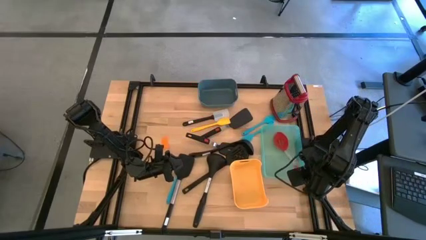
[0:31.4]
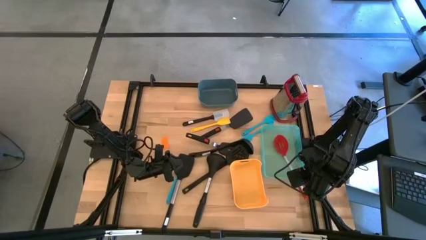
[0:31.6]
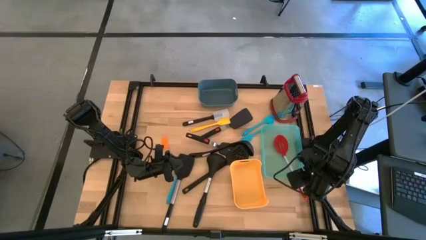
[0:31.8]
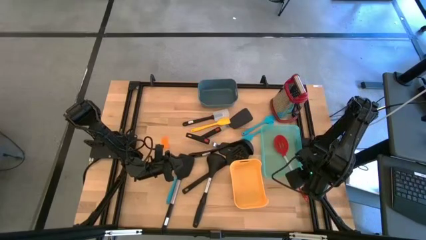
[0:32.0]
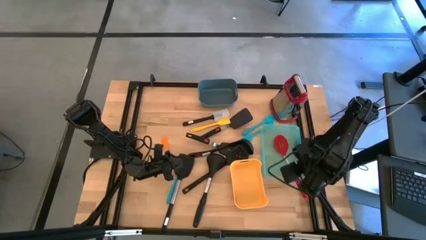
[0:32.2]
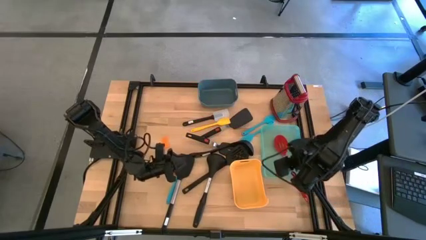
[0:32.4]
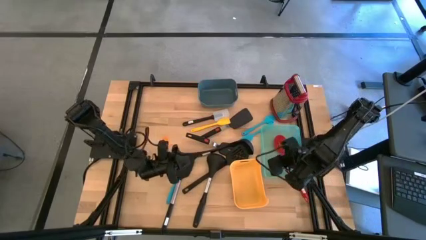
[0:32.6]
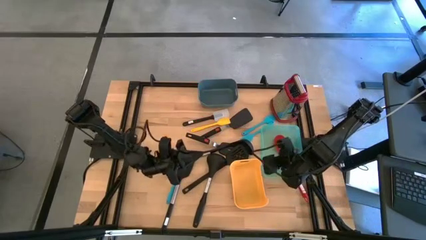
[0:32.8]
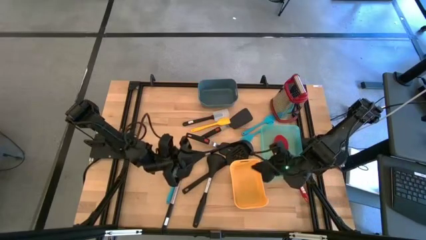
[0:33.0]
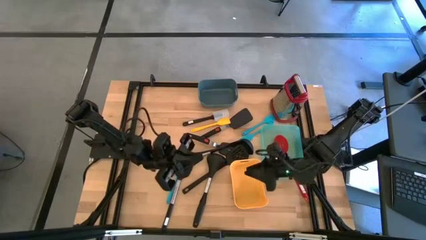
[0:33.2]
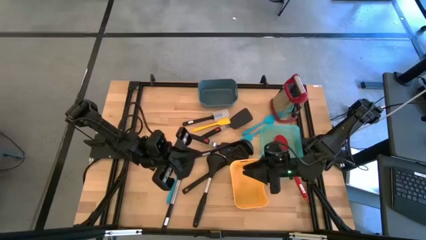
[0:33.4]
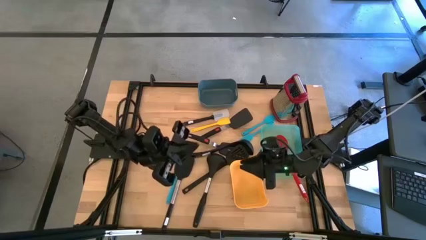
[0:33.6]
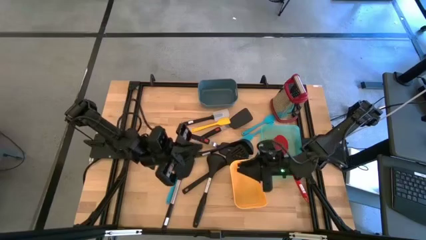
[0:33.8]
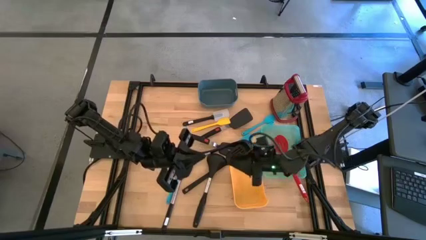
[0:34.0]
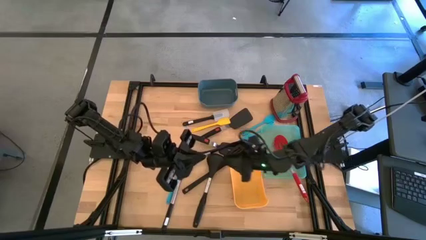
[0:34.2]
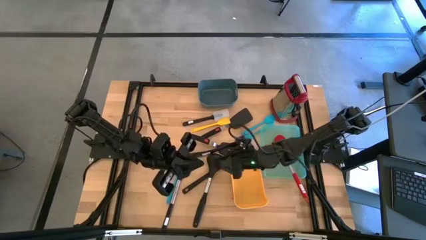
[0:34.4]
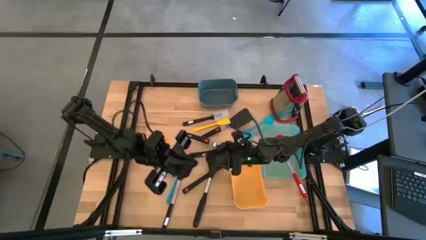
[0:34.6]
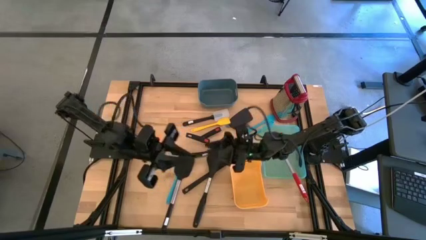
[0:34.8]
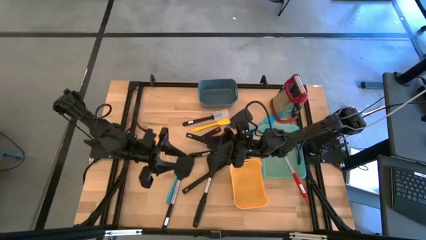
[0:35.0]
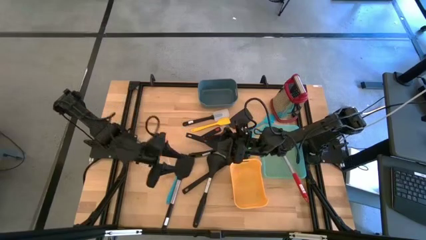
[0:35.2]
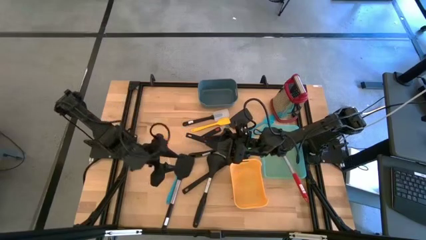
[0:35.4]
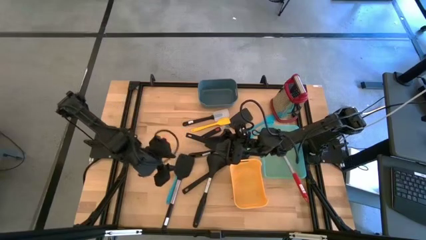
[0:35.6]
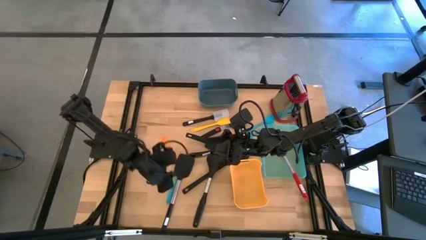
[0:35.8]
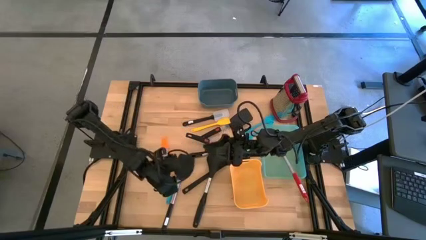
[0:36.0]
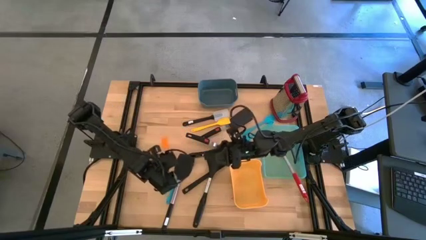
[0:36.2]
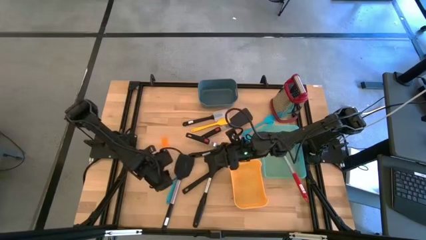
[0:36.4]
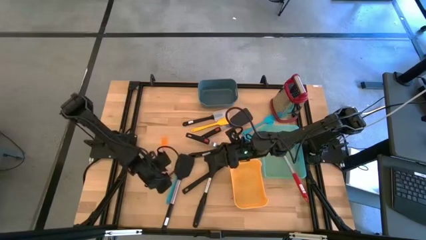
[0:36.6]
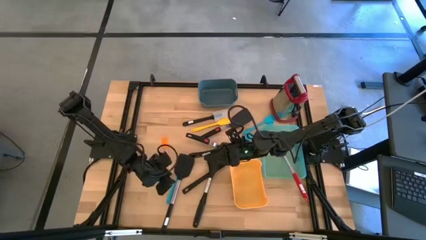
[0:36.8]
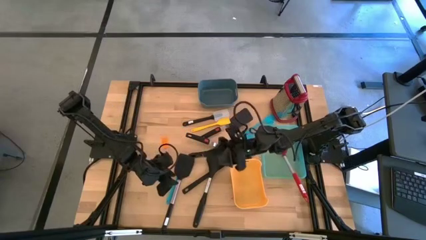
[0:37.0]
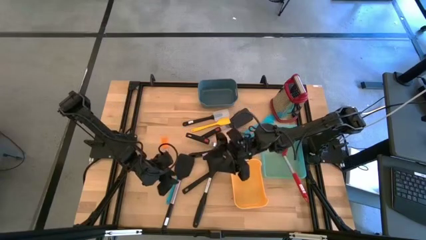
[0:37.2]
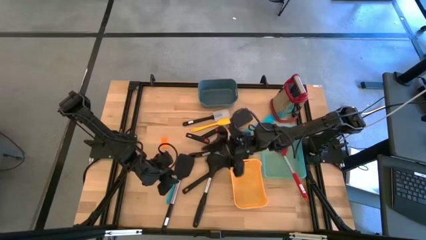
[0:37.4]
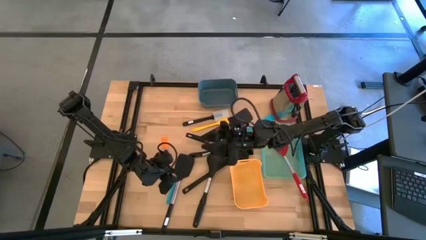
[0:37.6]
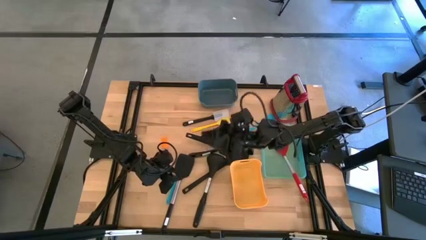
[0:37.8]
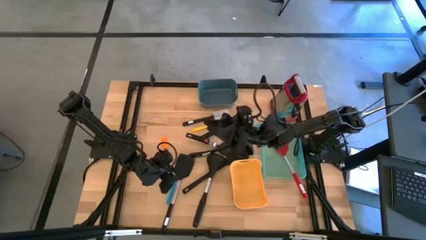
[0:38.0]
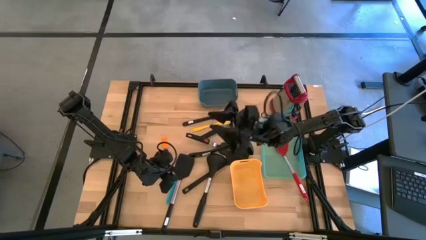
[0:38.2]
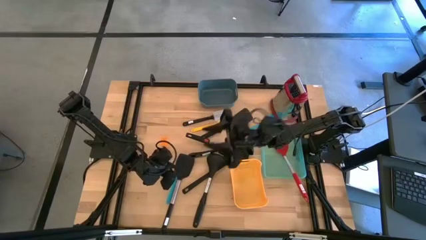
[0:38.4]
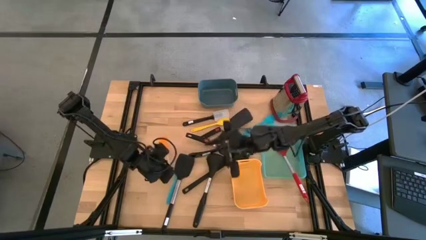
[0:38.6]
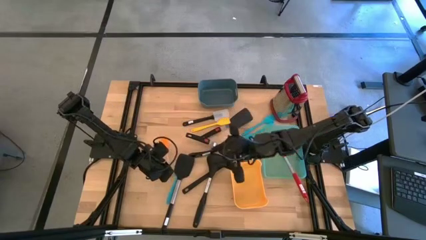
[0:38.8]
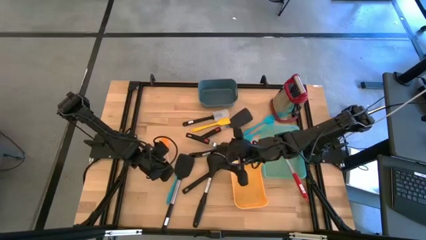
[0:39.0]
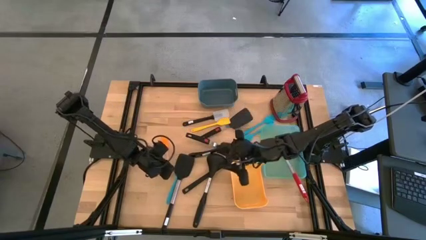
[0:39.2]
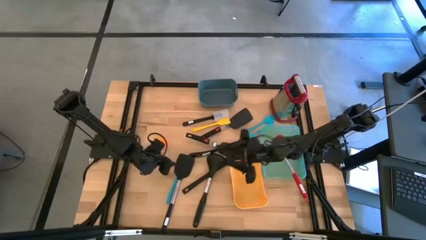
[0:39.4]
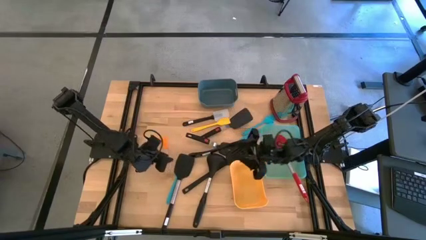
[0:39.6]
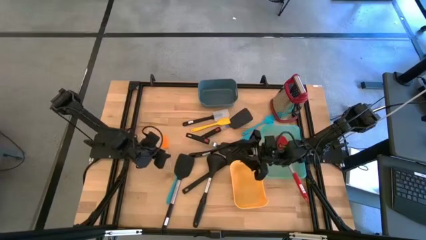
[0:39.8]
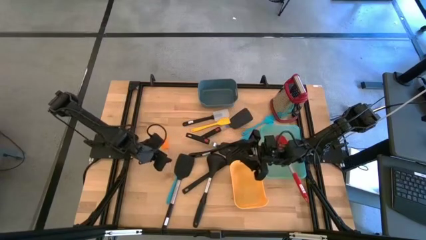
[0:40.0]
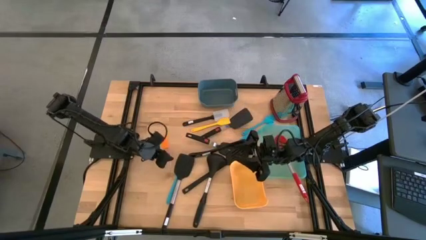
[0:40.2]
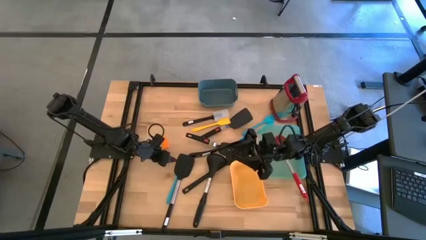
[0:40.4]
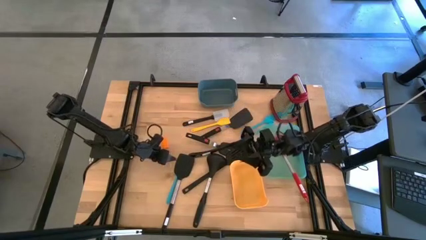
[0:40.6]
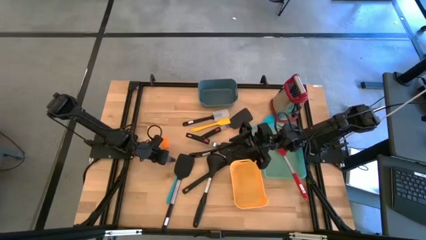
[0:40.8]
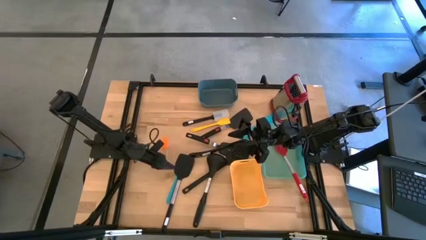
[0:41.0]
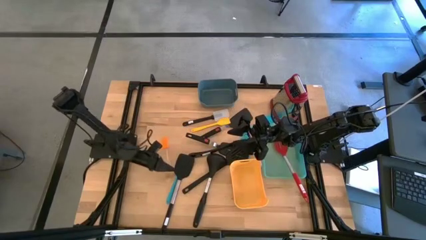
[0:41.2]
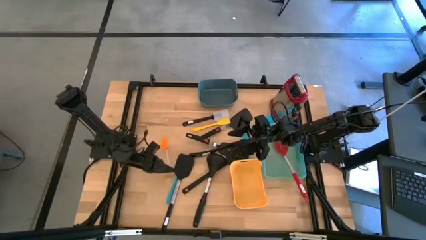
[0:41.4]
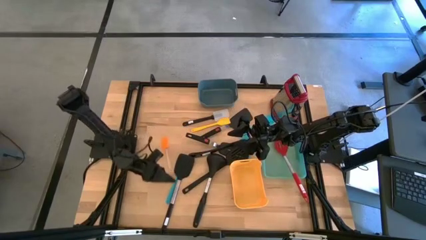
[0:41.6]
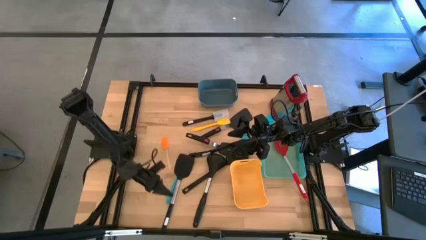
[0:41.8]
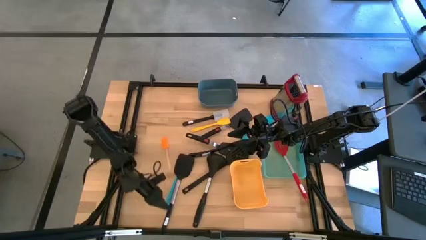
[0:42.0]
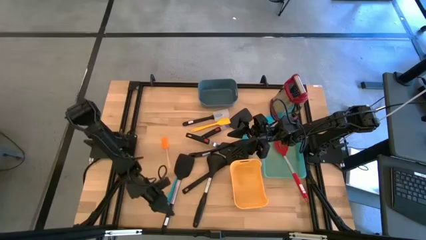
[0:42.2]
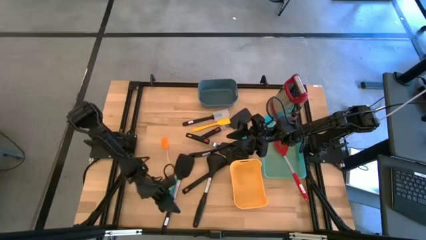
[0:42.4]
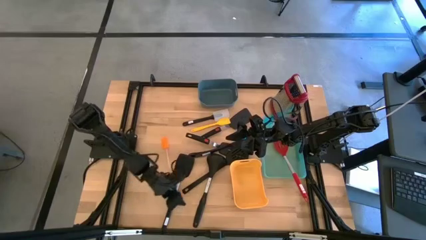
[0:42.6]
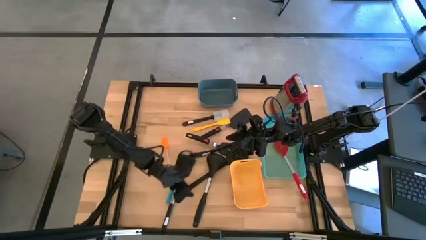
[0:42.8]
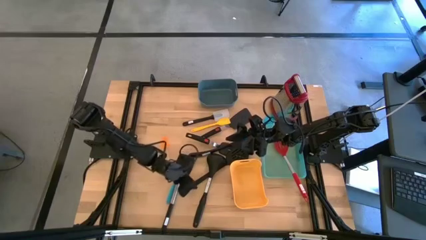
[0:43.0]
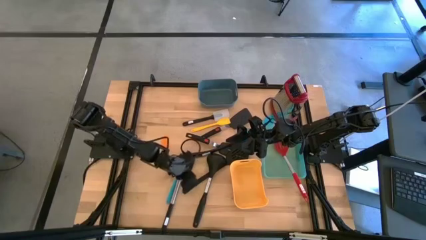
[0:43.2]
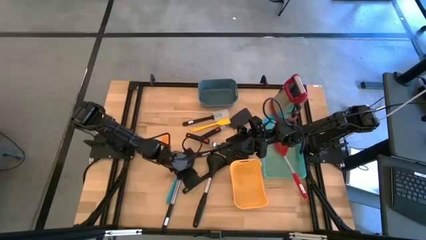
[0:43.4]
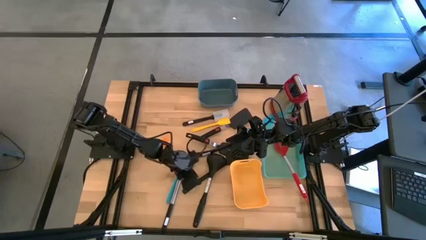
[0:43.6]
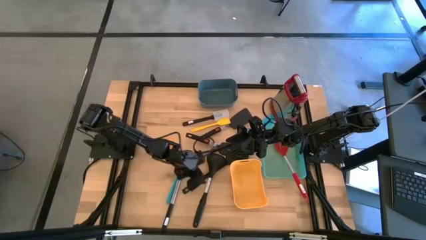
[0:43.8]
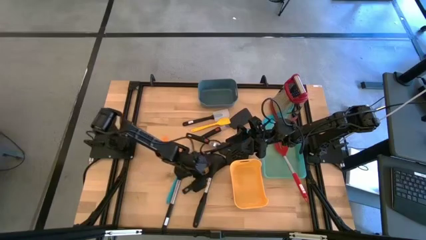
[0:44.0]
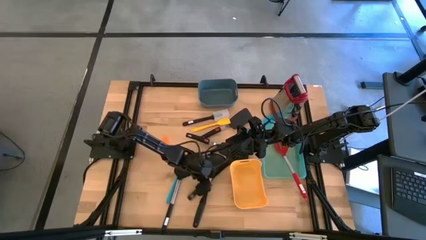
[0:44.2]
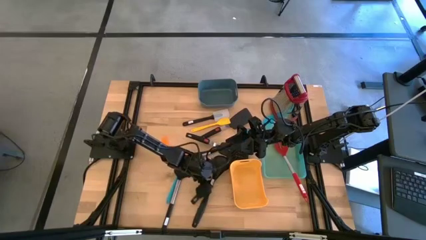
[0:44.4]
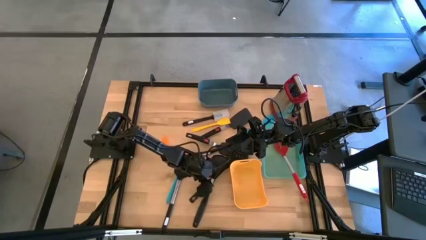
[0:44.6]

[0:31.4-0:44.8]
Task: Pick & Place Kitchen Items
Put the black serving spoon into the green bin
